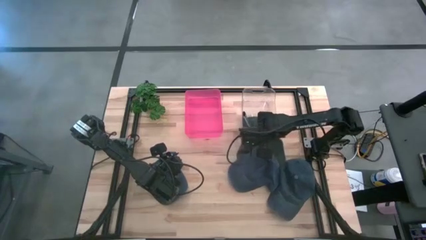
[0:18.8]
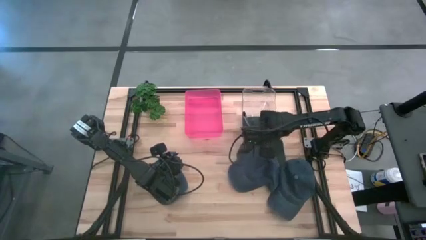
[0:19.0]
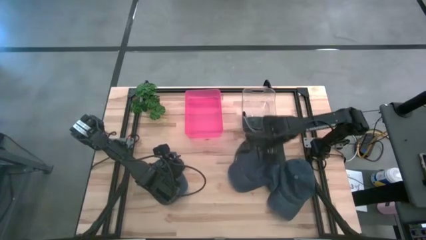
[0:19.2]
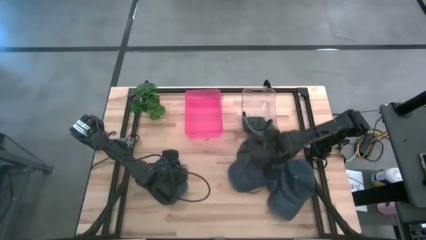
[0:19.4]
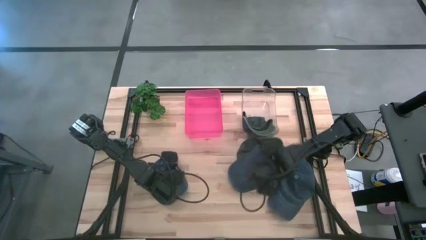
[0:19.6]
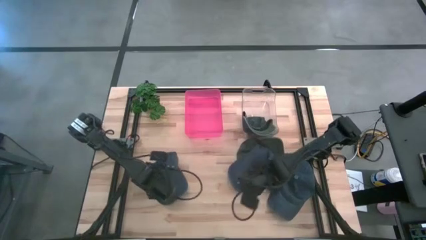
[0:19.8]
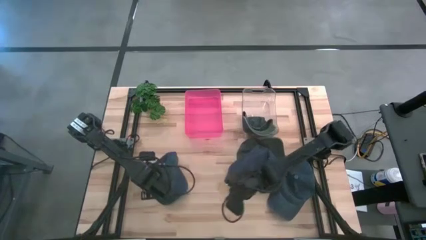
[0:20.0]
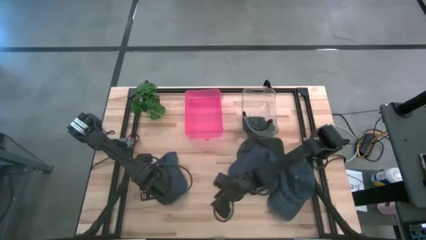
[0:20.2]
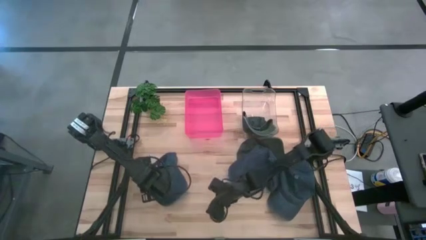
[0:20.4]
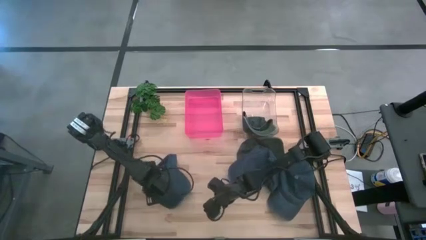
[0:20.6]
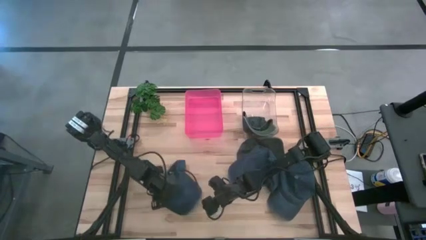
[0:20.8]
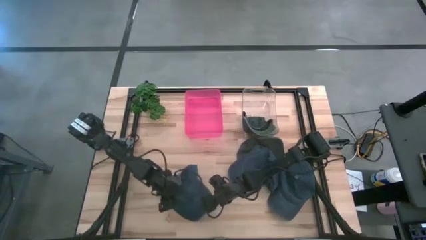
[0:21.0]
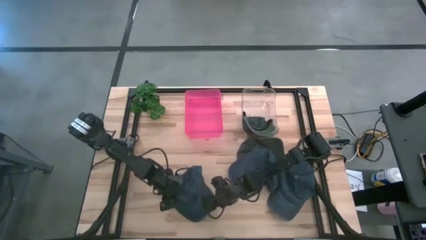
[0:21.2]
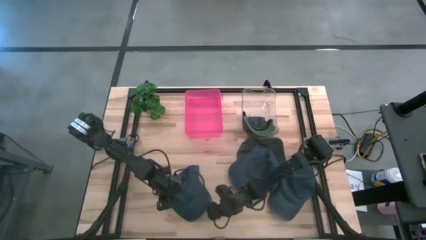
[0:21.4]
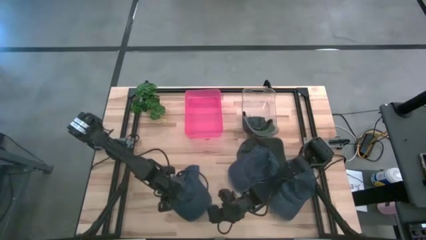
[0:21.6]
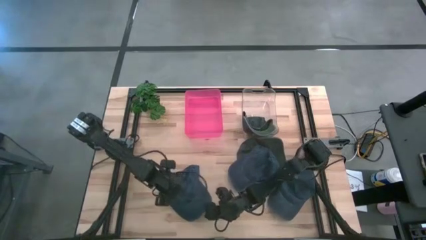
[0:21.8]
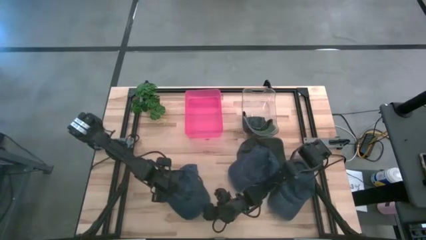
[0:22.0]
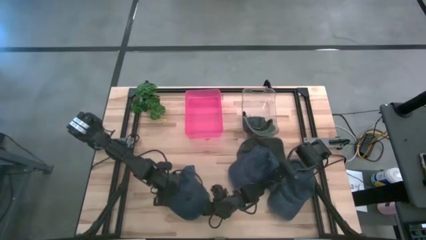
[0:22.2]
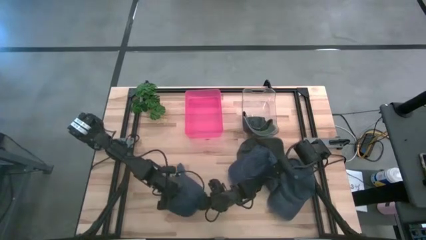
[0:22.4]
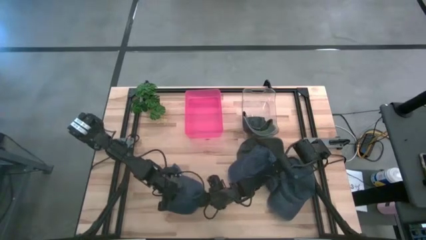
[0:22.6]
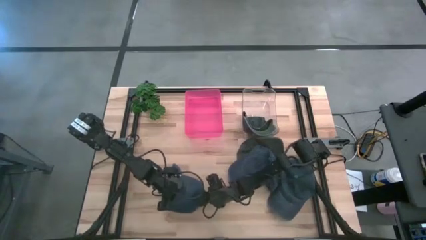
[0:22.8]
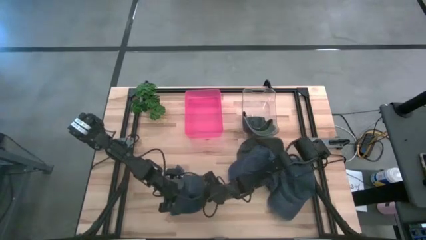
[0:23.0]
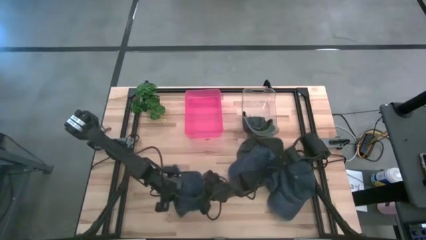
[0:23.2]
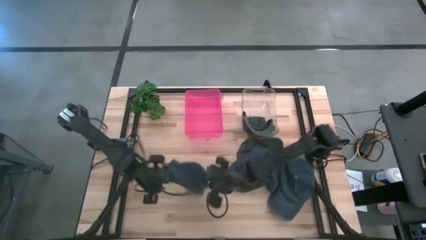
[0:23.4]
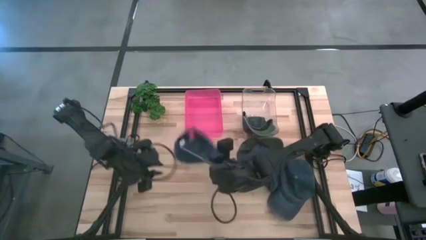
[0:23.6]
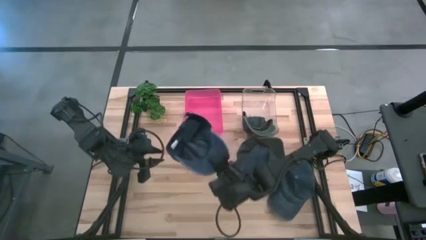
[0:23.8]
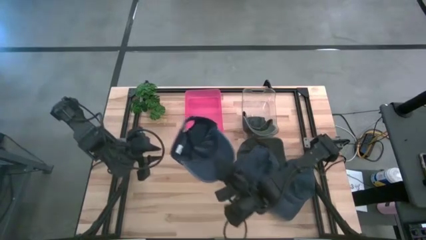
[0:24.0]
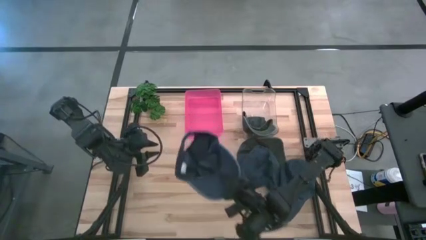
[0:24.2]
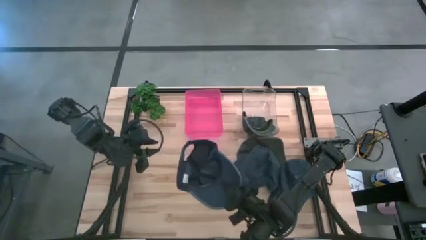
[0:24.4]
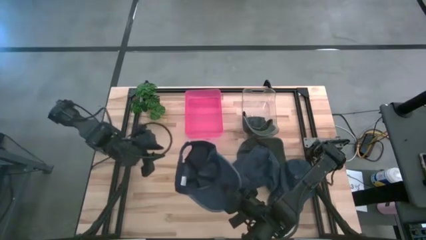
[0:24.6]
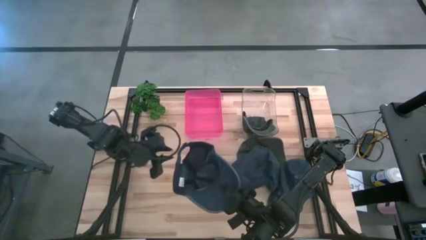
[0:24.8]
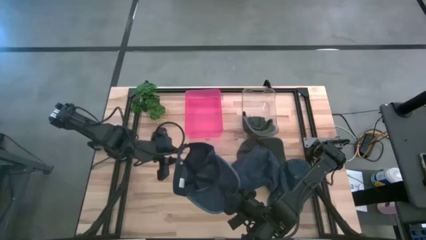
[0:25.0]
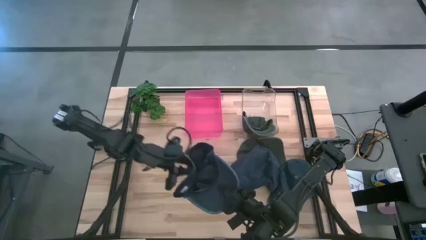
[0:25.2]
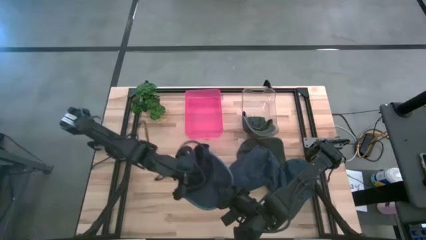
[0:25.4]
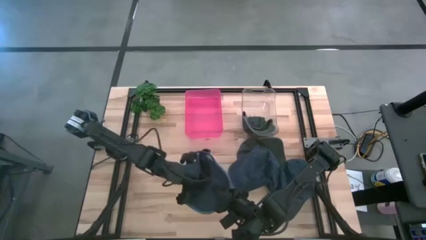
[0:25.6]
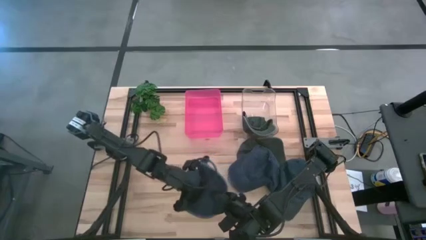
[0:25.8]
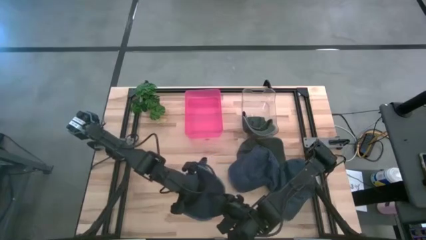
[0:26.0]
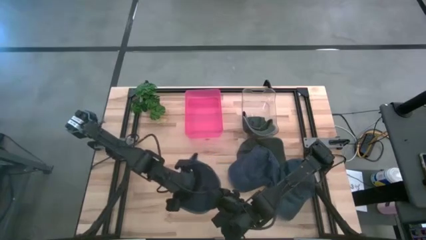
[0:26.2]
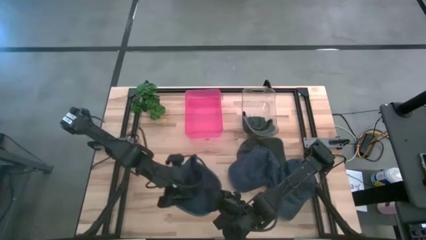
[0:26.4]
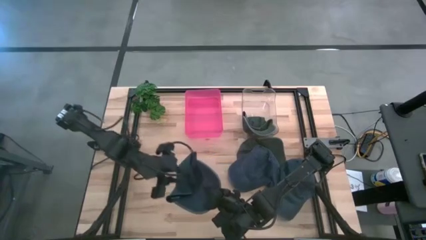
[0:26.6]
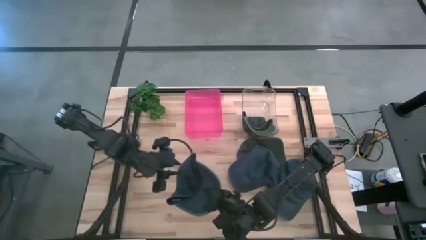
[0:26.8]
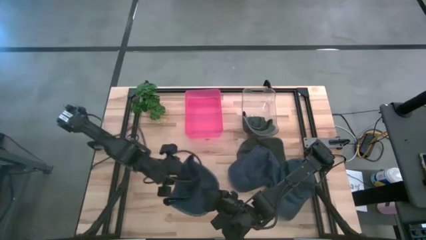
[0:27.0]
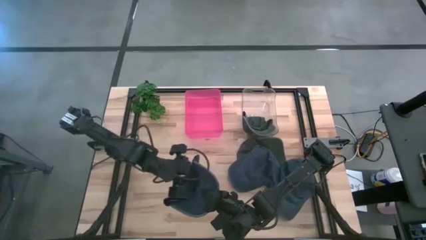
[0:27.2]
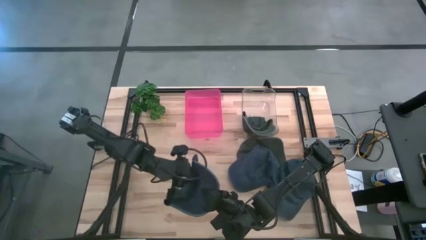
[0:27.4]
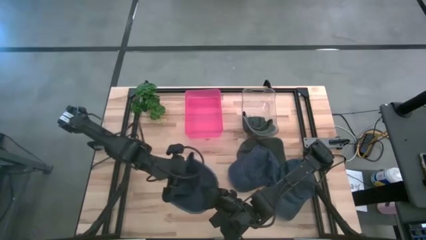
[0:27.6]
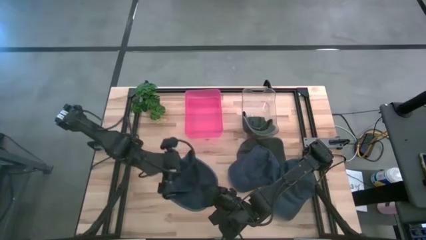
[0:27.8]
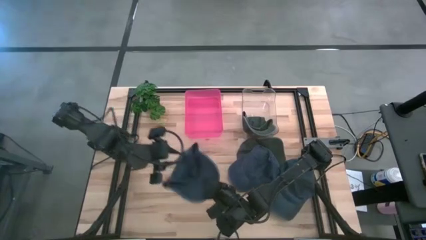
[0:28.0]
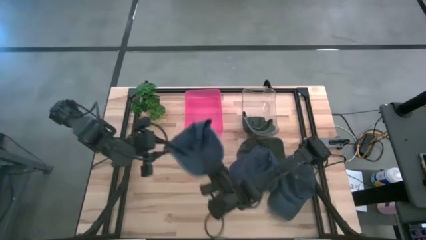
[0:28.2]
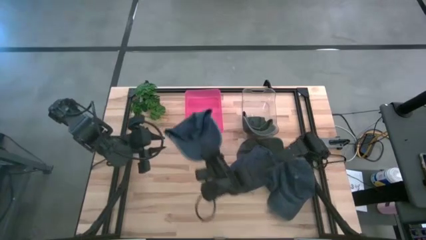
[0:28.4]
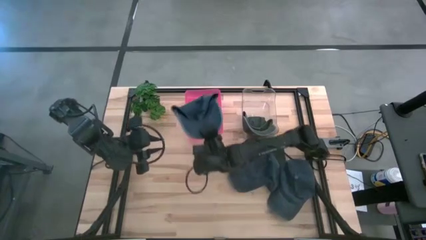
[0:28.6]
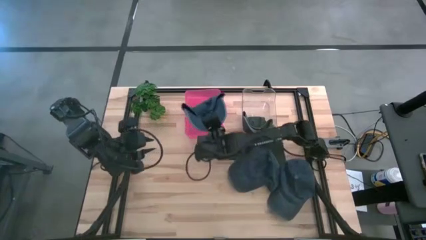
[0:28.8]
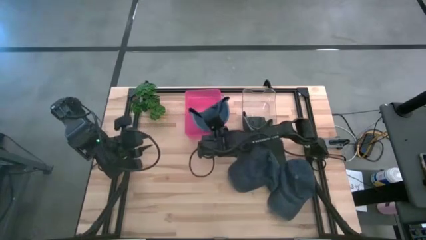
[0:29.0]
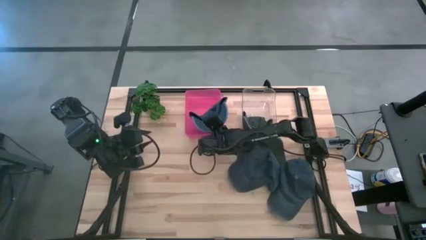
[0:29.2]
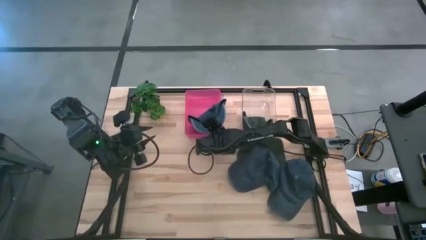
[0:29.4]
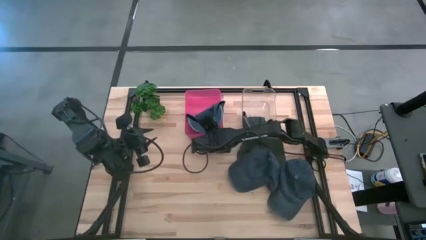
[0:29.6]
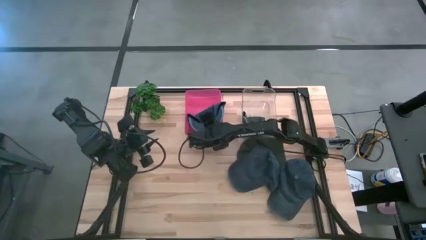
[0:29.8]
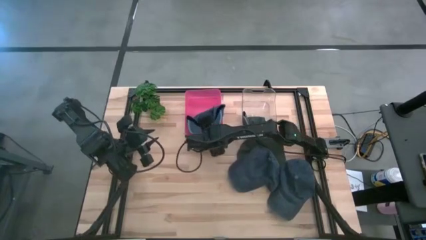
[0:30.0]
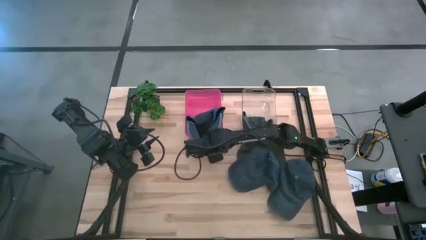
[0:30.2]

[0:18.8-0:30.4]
Task: Pick & Place hat
Put the left blue cap into the red bin
